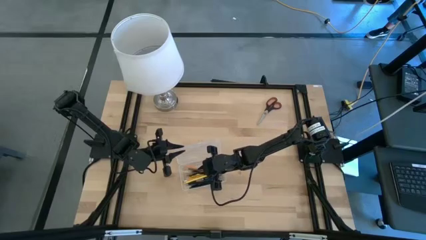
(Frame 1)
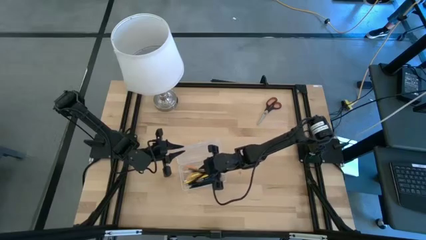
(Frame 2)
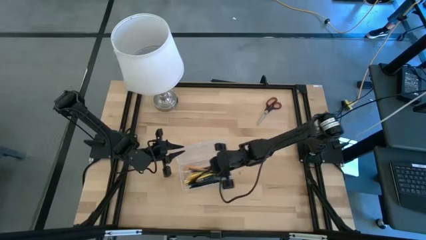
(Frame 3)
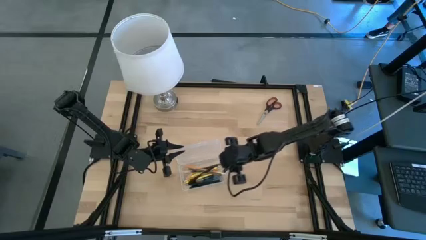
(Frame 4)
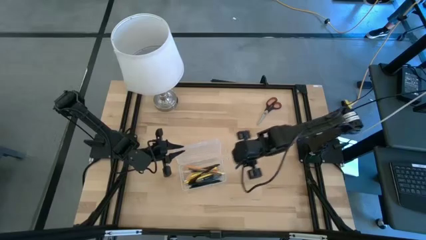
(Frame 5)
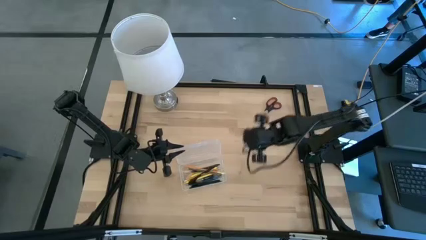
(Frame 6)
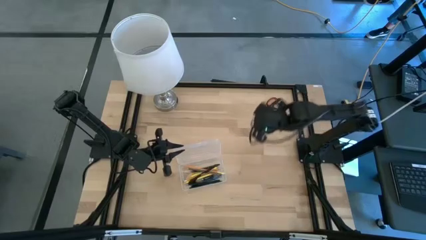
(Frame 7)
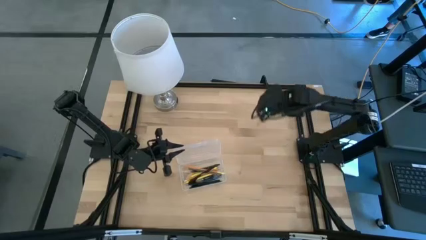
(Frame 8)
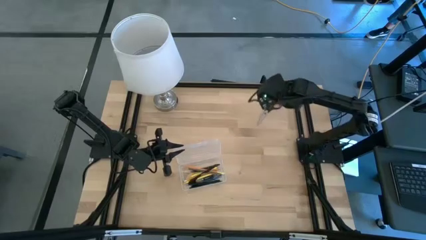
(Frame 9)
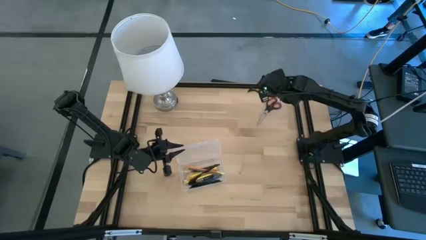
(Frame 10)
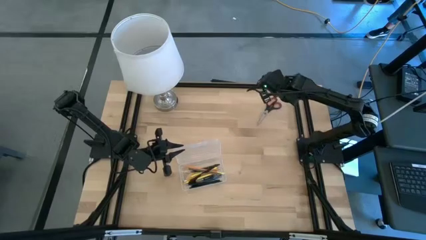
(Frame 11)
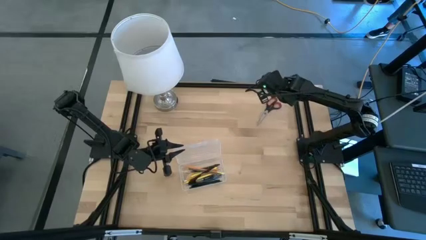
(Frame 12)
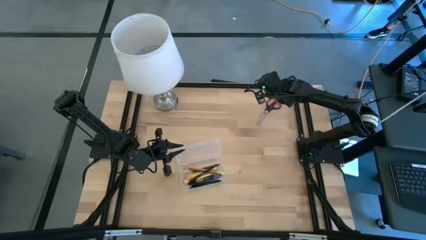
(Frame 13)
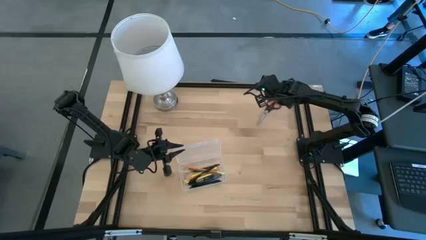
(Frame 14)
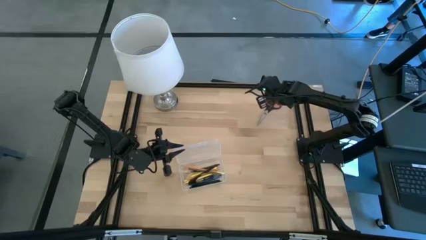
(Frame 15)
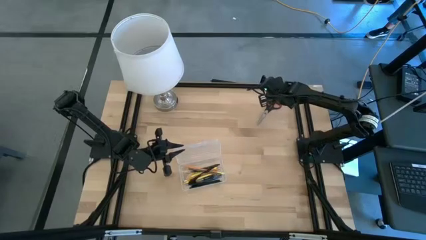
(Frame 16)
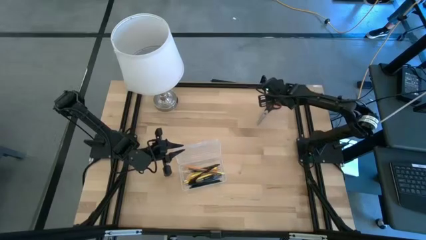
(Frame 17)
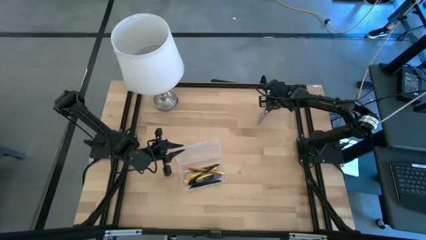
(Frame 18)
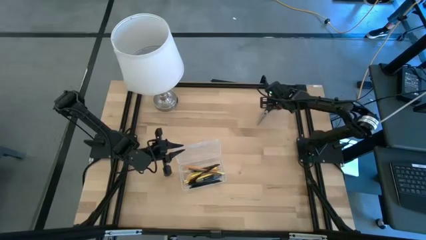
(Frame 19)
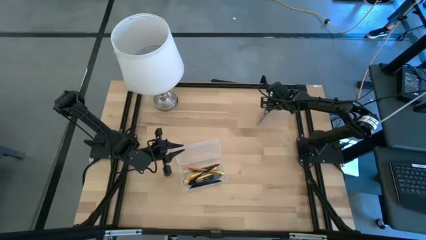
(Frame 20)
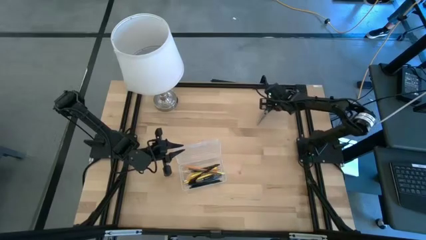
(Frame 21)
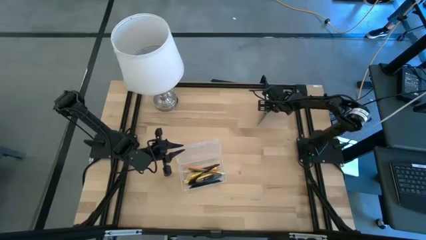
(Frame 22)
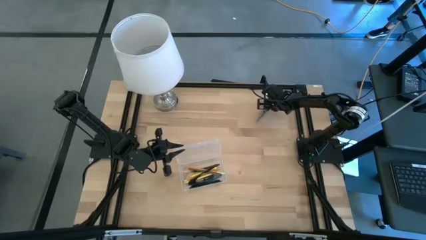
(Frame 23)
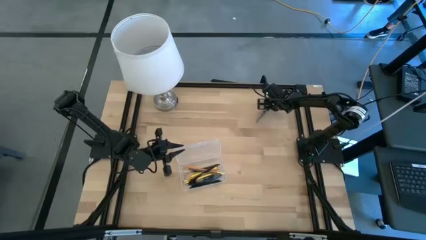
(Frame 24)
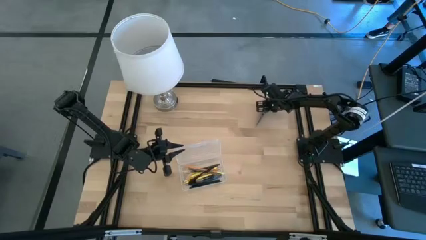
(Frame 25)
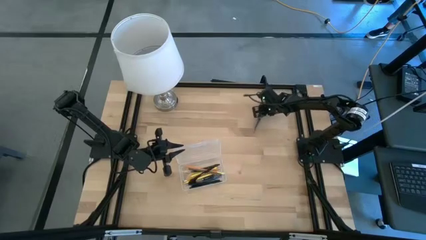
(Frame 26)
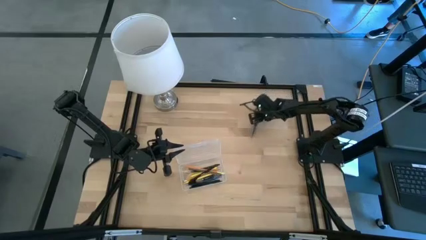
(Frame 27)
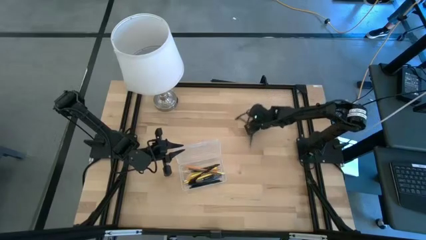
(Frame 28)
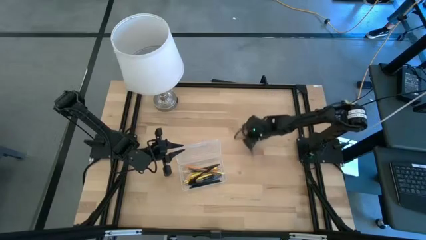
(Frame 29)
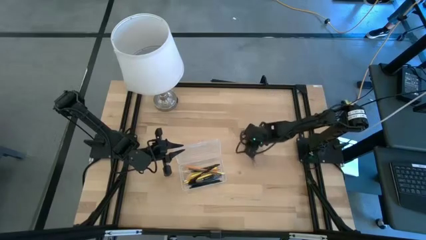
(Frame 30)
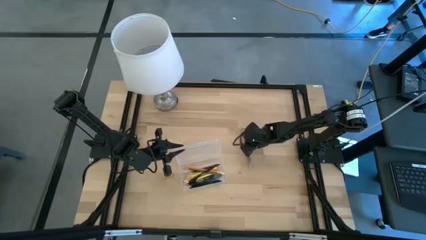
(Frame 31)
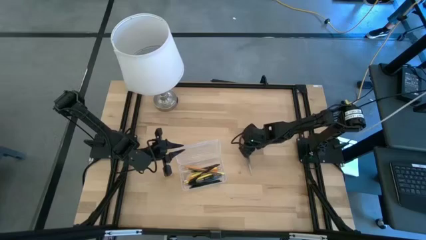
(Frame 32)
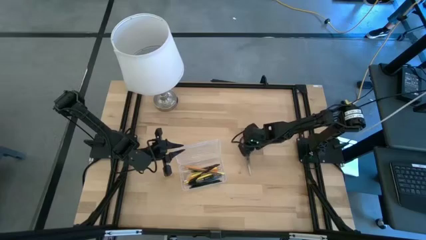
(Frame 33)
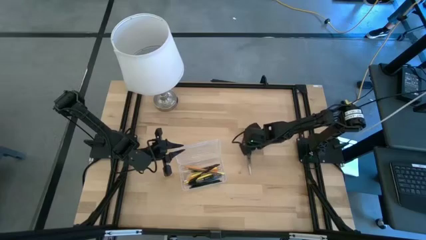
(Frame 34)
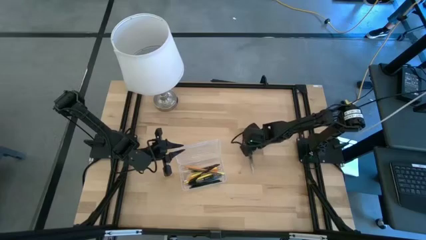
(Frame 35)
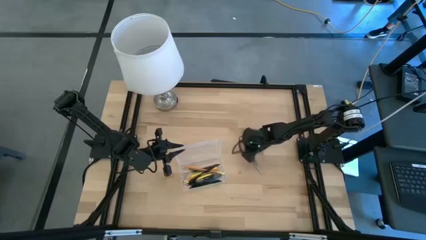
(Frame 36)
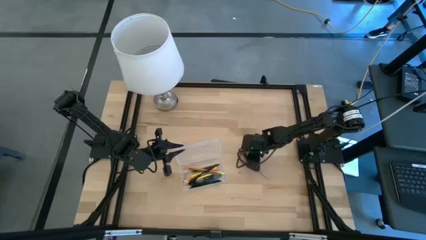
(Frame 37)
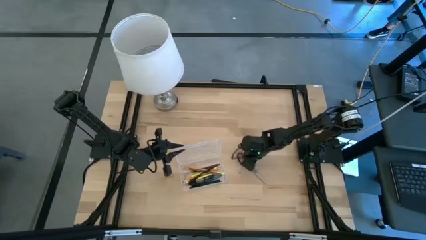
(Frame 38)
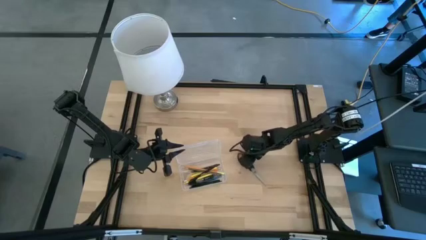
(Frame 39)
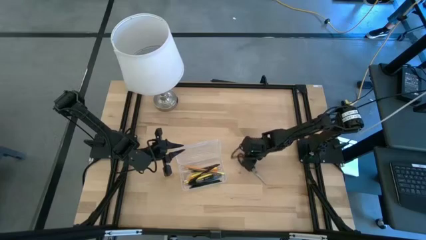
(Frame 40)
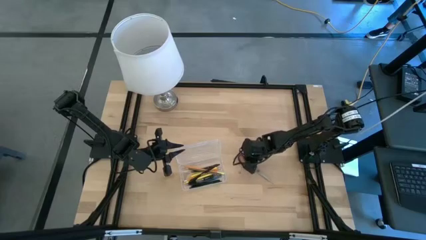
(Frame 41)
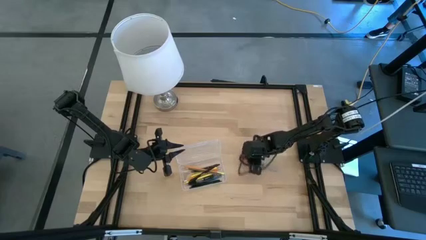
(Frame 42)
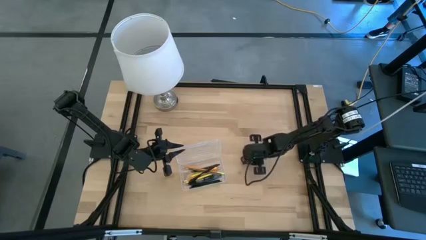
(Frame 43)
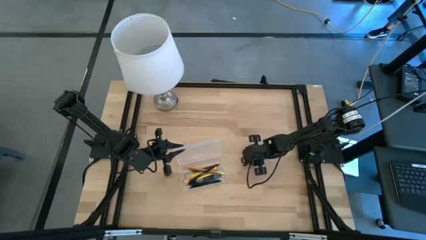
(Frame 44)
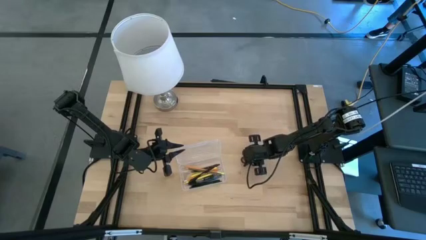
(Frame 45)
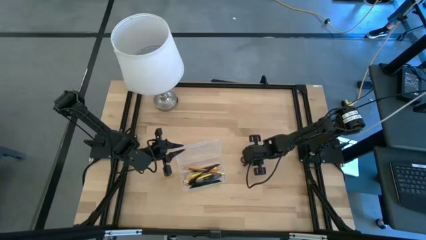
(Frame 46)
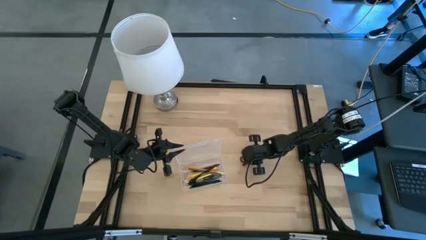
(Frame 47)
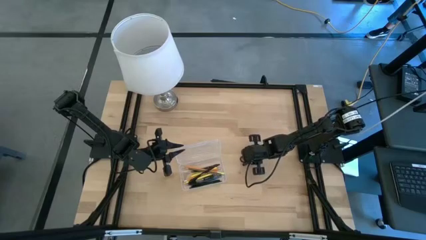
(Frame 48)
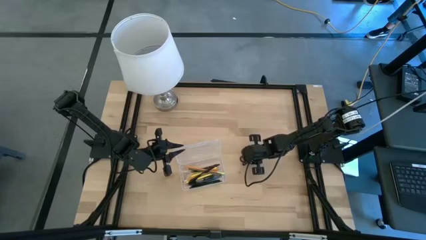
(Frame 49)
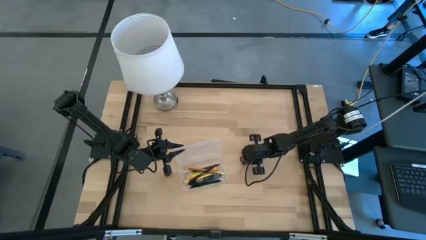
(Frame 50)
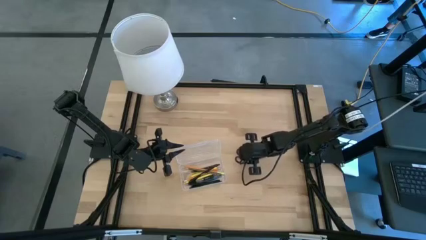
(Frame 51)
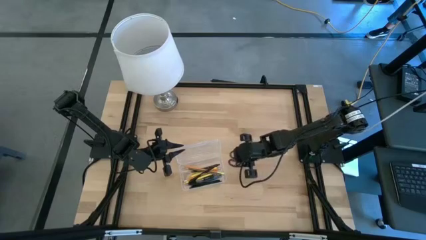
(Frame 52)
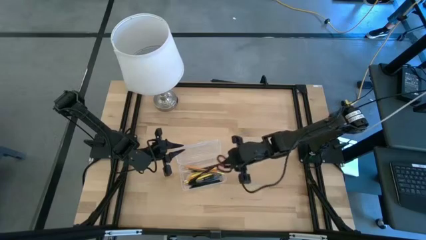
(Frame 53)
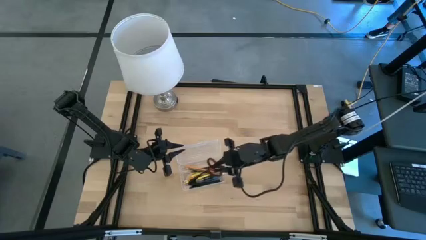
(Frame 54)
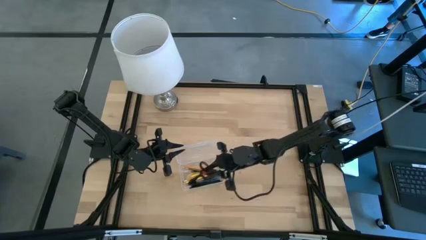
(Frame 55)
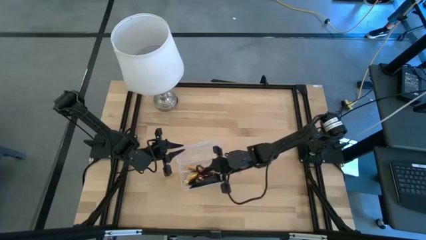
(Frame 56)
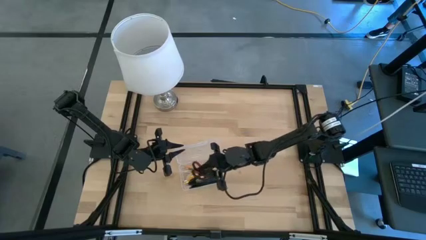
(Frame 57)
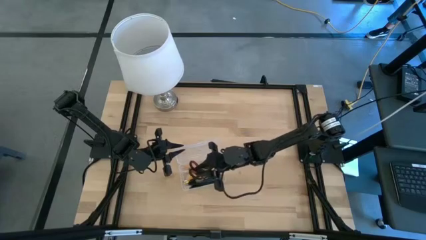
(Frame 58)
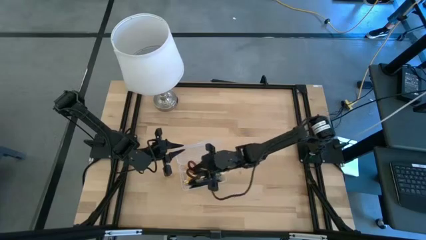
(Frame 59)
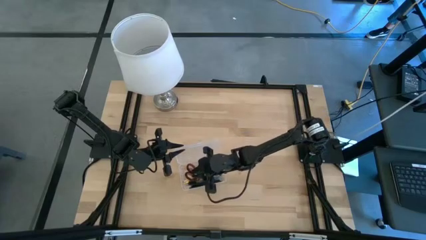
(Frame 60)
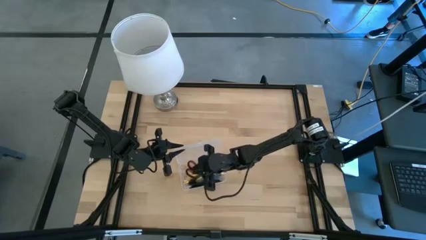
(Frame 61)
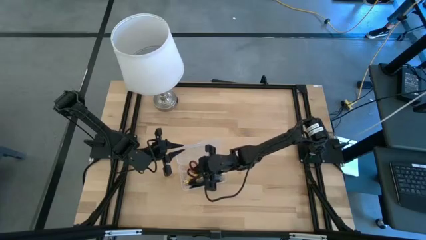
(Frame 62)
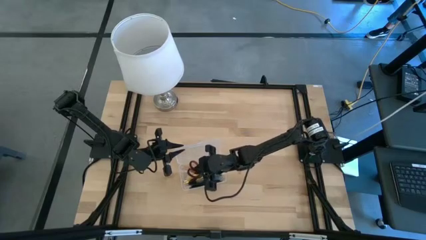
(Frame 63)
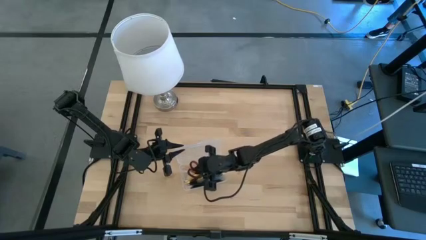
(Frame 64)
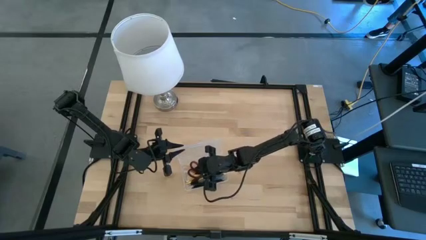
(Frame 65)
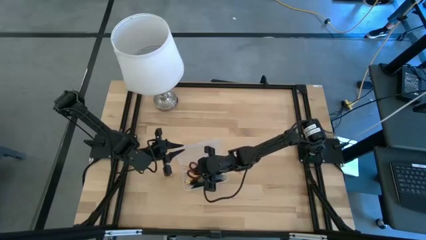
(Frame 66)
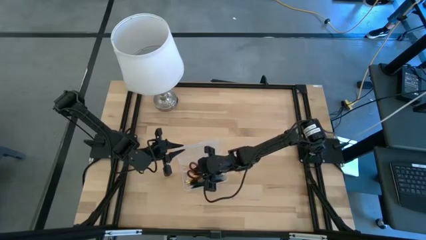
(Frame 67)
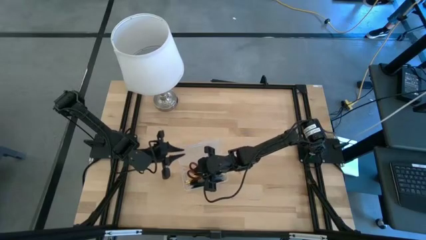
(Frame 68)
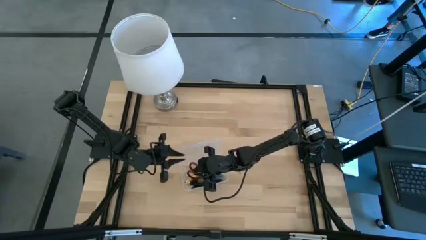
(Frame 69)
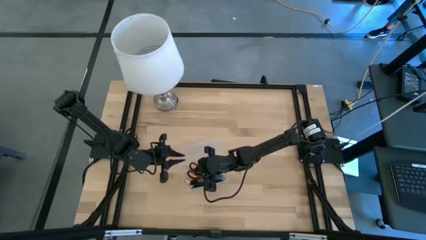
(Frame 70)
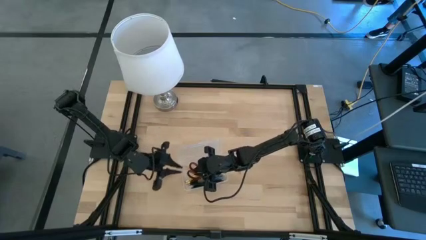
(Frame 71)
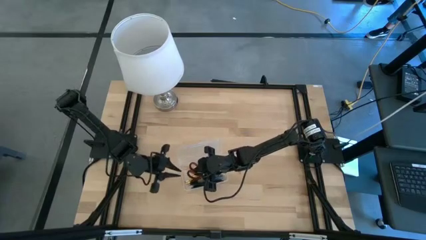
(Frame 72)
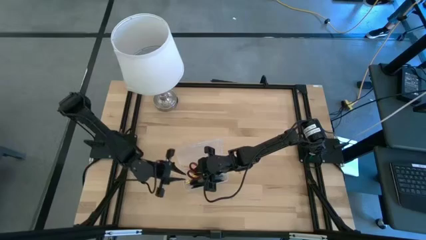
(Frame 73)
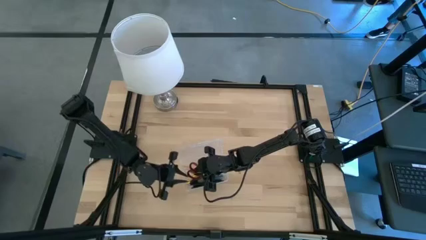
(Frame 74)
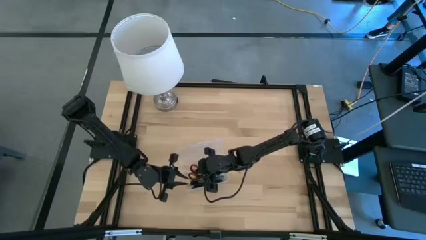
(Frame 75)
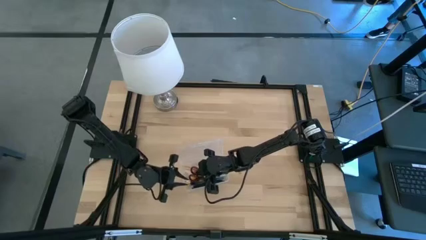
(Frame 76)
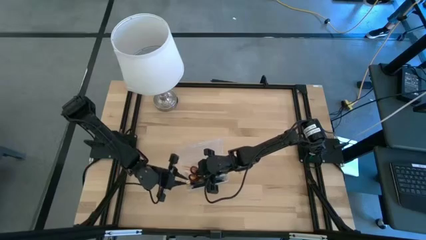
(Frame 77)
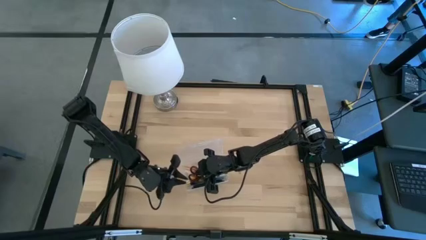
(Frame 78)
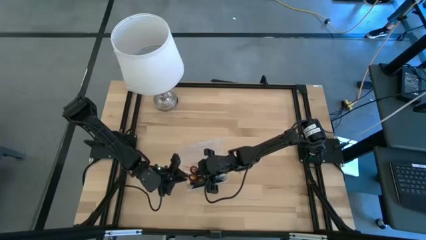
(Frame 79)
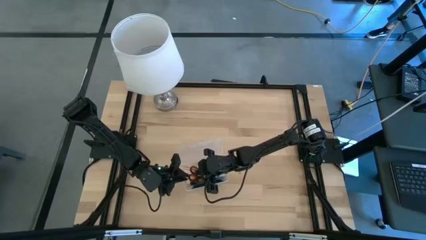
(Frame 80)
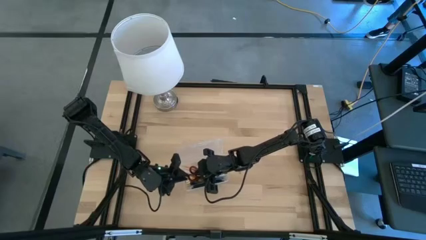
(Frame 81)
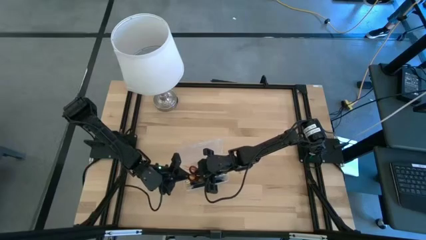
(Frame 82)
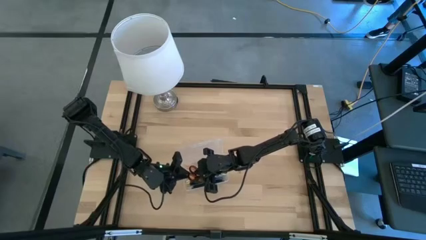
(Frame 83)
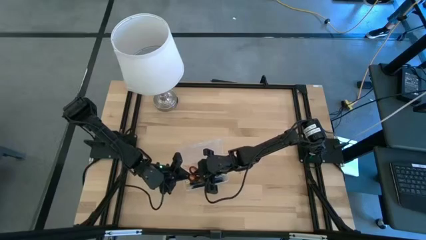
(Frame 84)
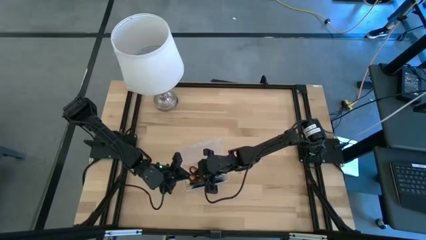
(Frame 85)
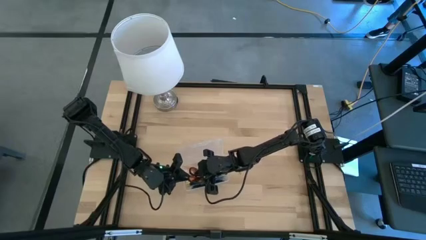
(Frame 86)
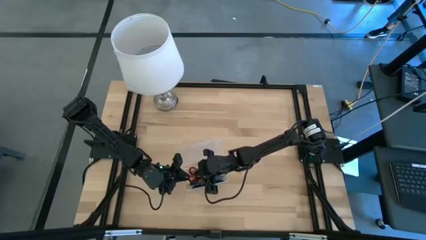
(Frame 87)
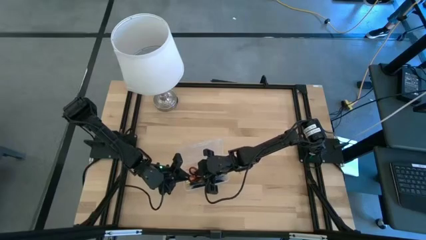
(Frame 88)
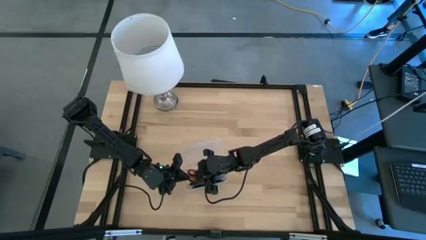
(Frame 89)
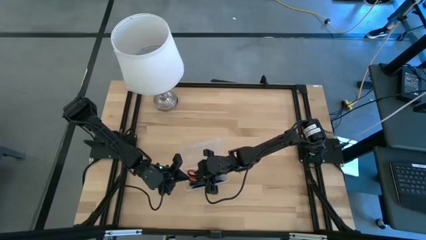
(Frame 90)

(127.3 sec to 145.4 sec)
Task: Pick & place school supplies into a supply box
Put the black scissors into the transparent supply box

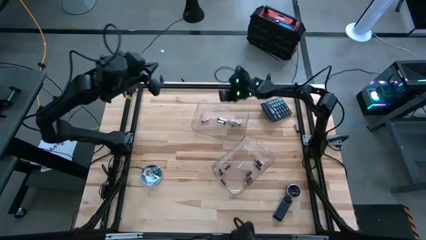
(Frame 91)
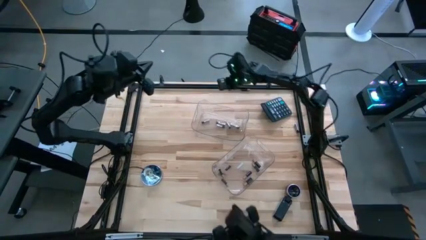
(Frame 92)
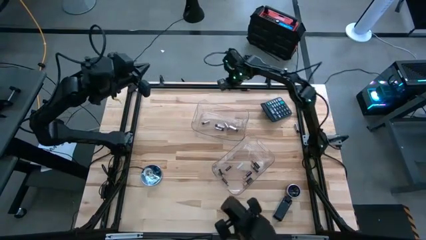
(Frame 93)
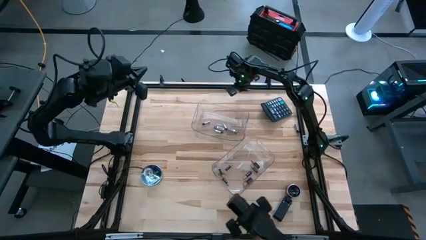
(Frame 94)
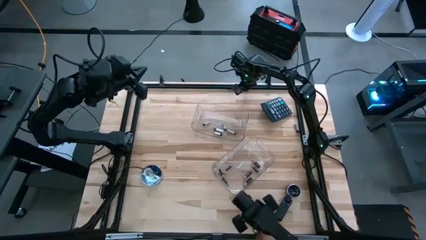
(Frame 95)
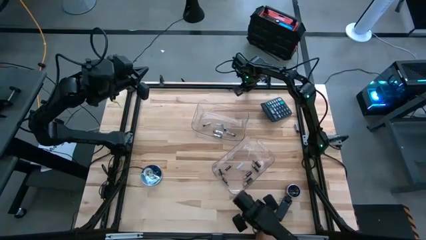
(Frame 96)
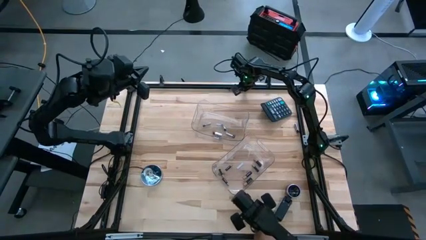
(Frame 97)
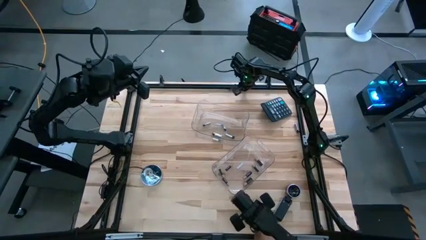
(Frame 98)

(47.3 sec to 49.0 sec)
Task: Sort batteries
Adjust the black battery
